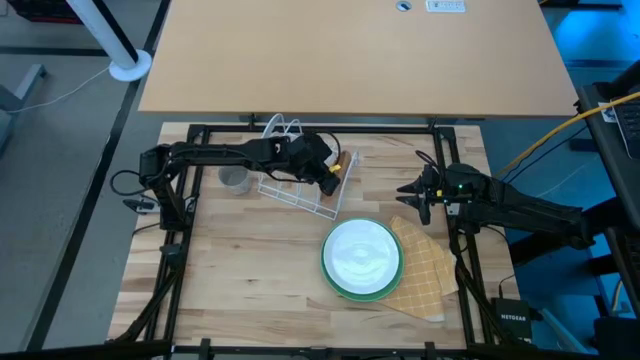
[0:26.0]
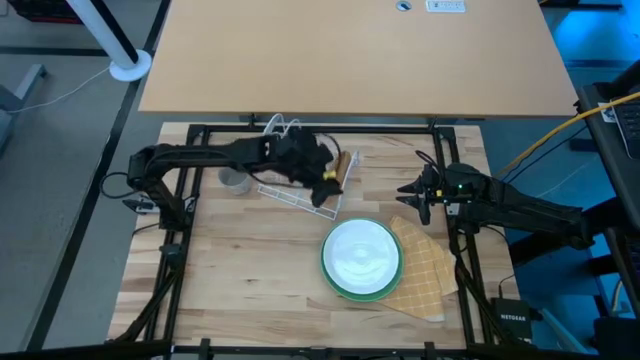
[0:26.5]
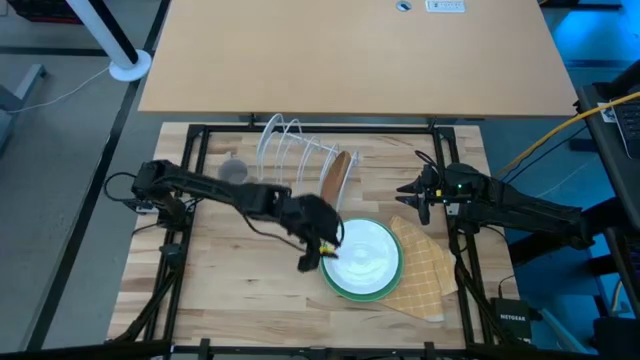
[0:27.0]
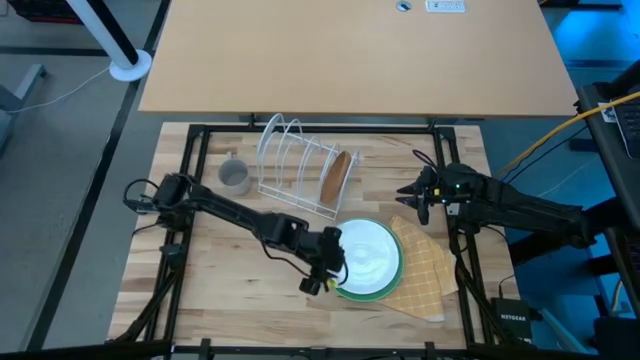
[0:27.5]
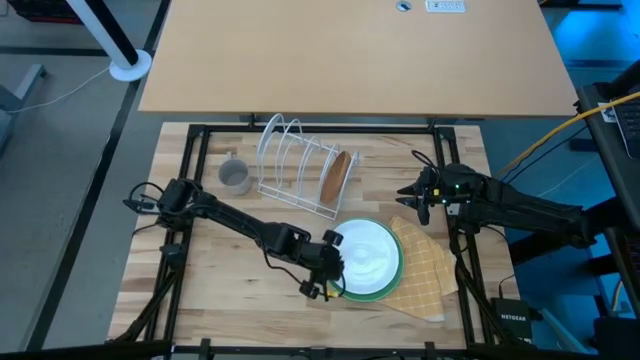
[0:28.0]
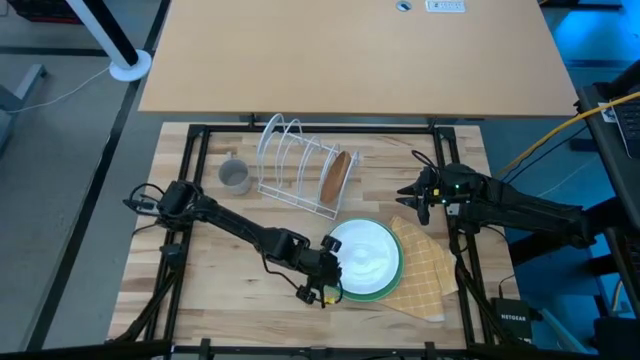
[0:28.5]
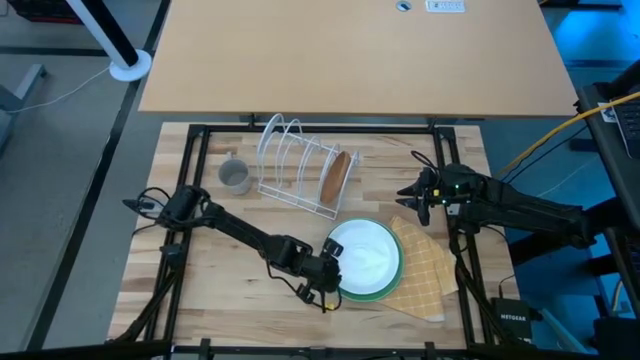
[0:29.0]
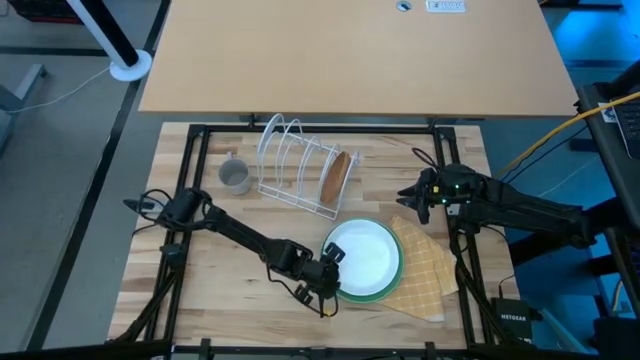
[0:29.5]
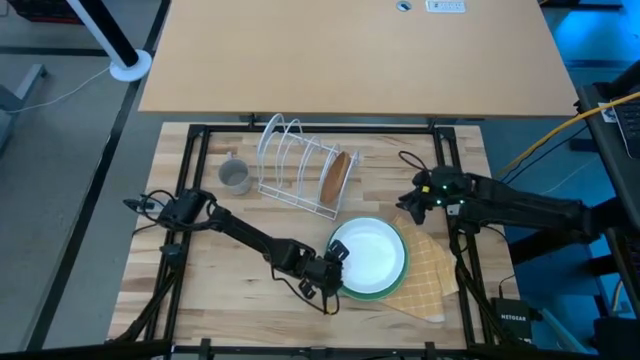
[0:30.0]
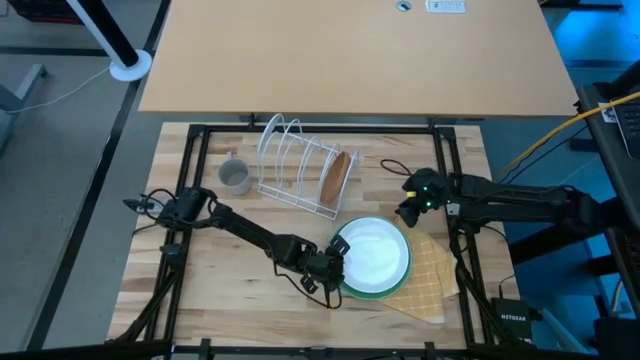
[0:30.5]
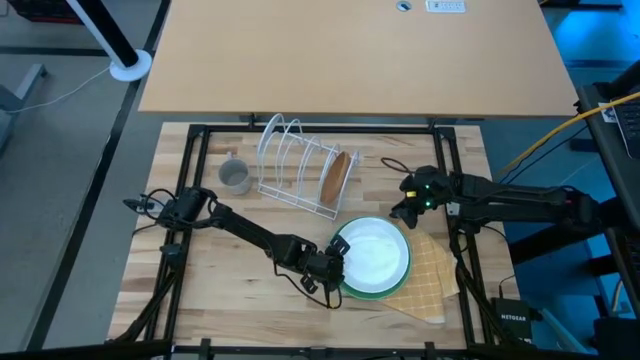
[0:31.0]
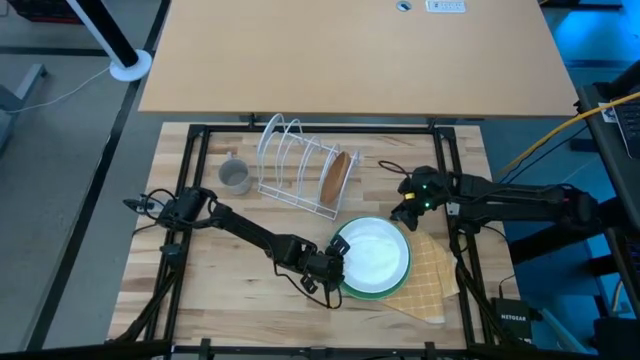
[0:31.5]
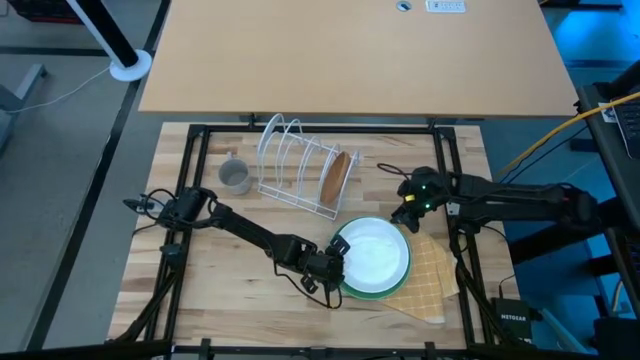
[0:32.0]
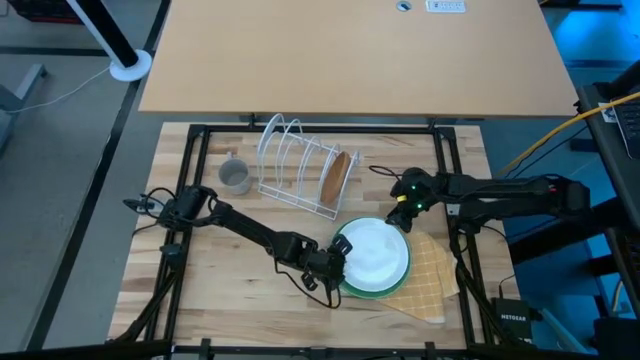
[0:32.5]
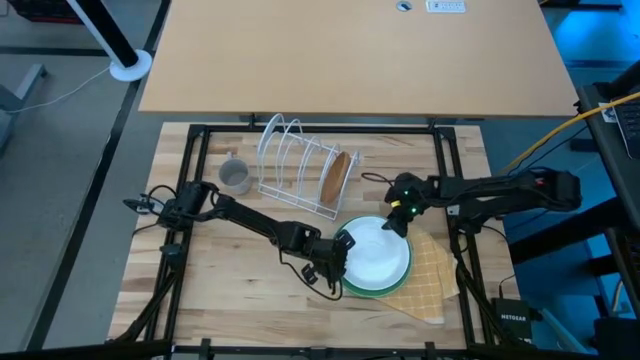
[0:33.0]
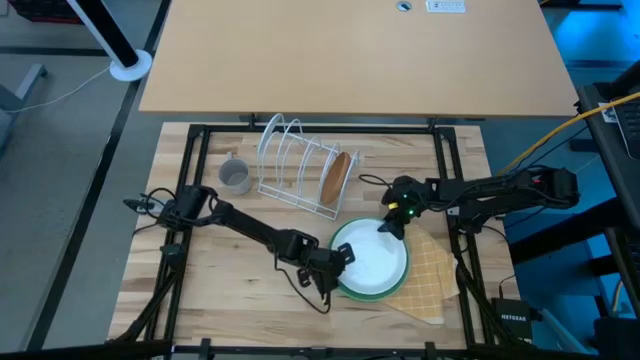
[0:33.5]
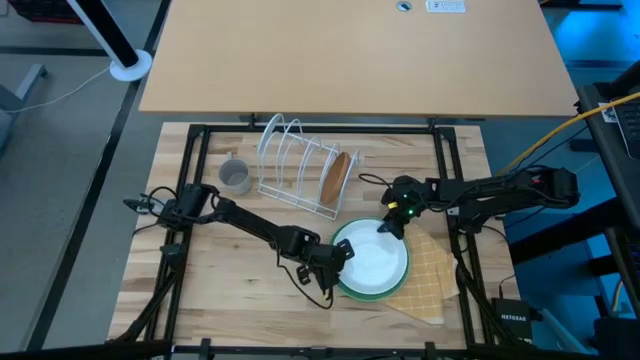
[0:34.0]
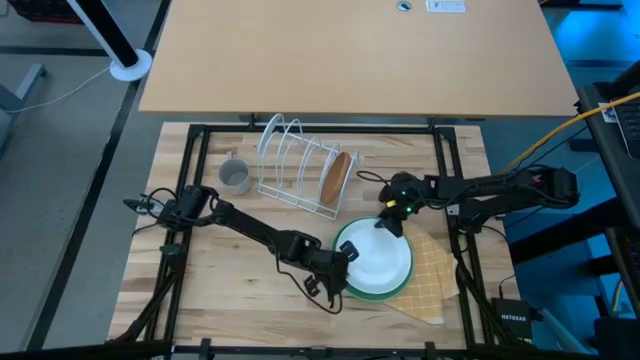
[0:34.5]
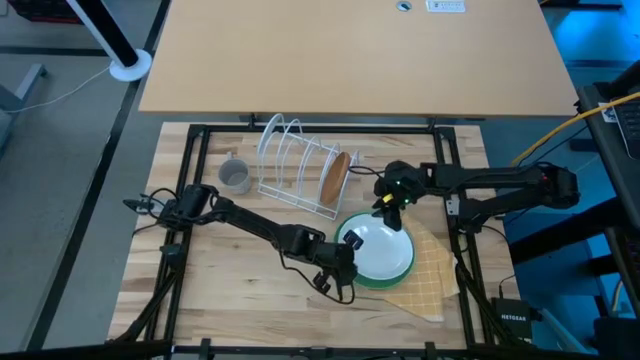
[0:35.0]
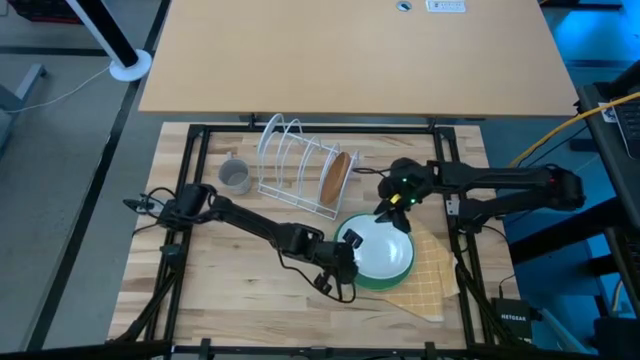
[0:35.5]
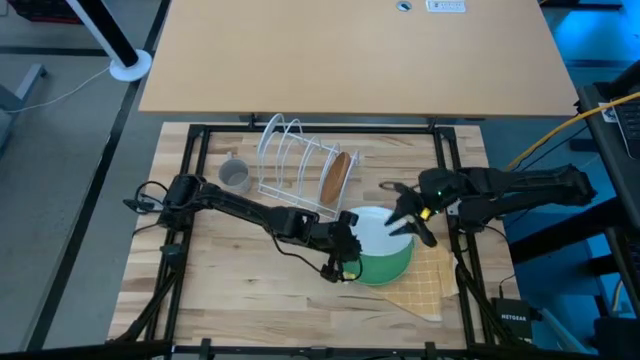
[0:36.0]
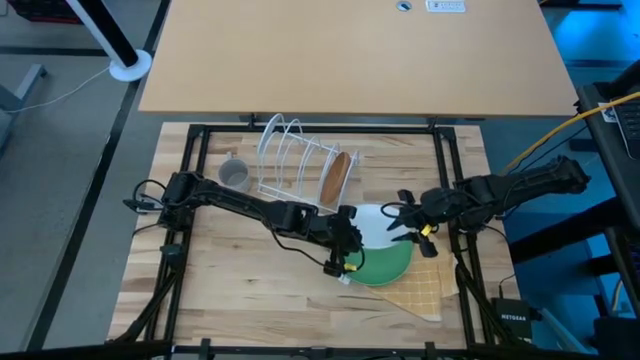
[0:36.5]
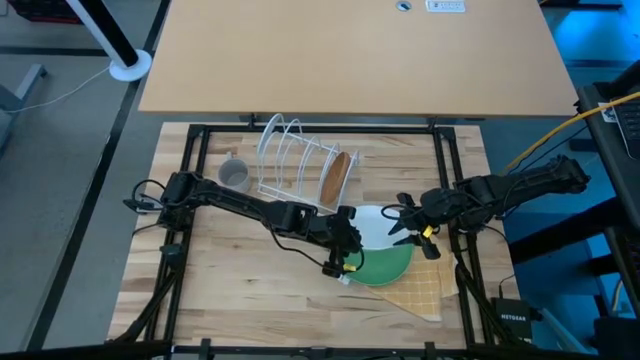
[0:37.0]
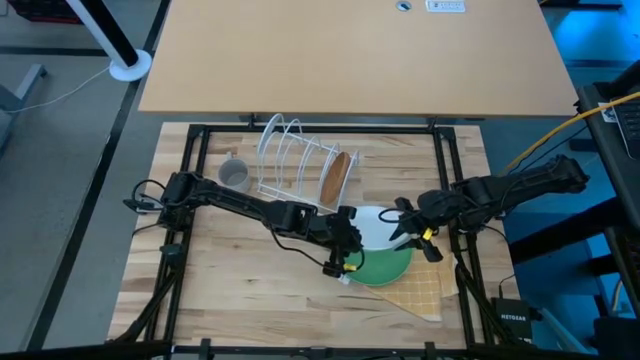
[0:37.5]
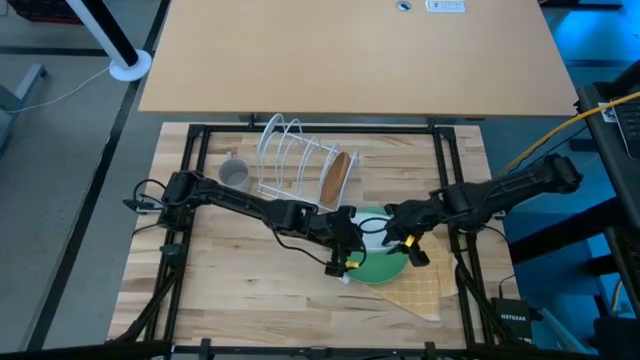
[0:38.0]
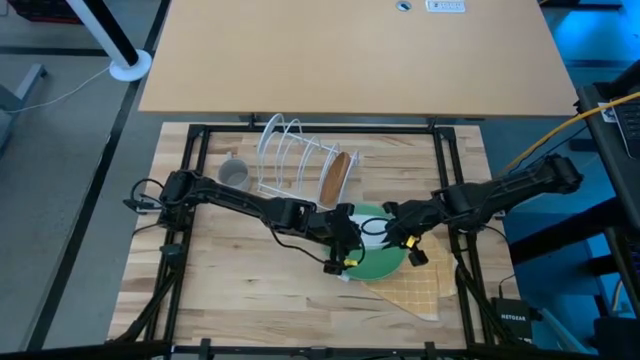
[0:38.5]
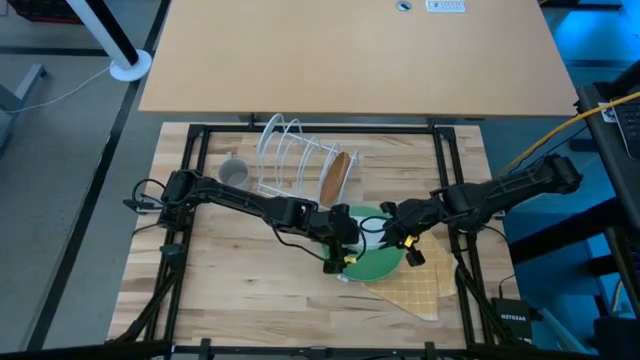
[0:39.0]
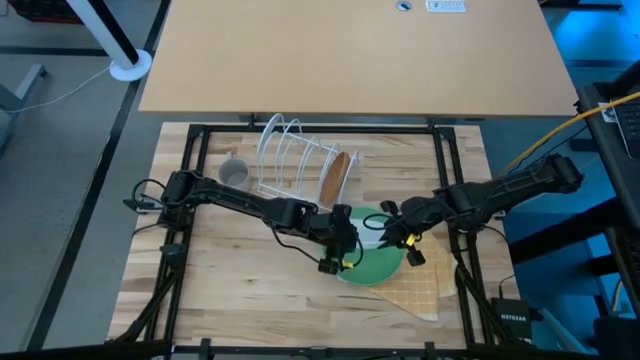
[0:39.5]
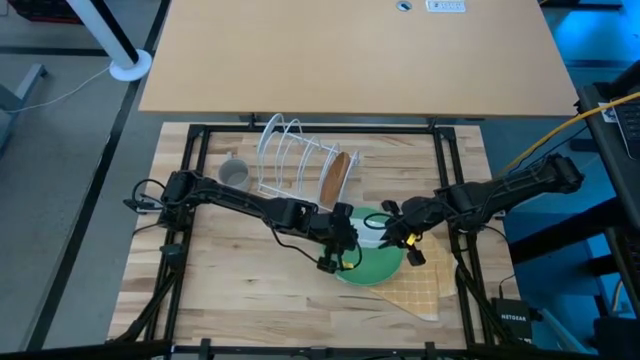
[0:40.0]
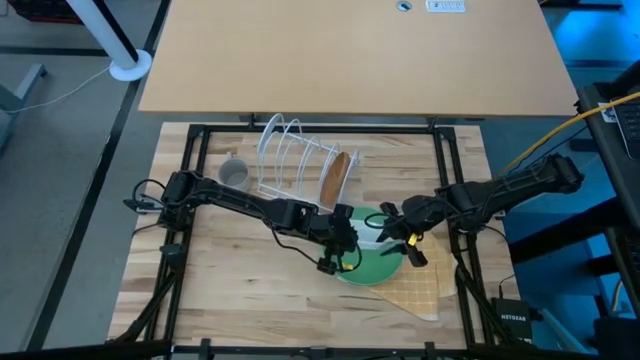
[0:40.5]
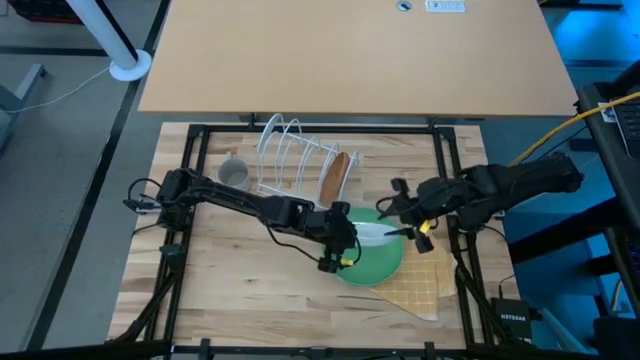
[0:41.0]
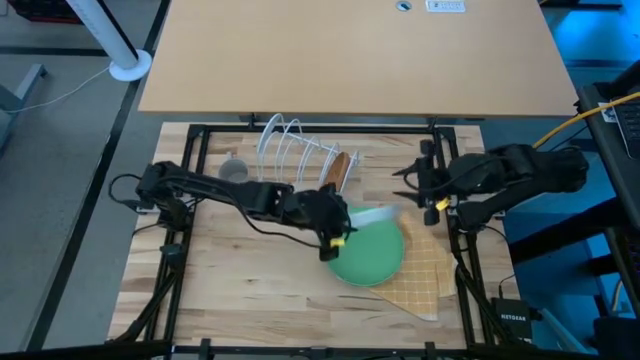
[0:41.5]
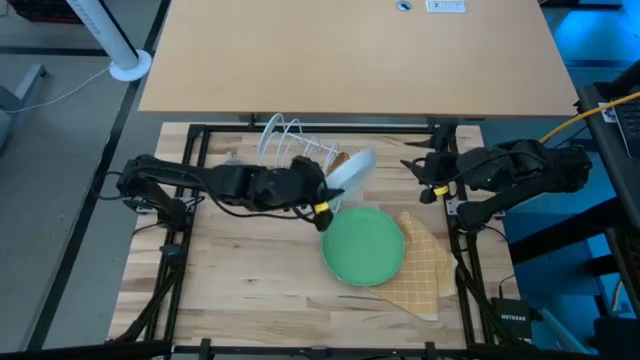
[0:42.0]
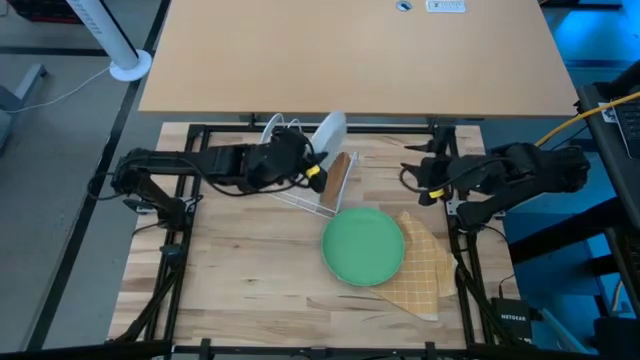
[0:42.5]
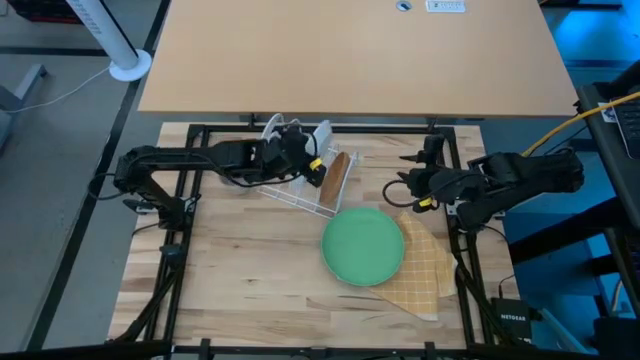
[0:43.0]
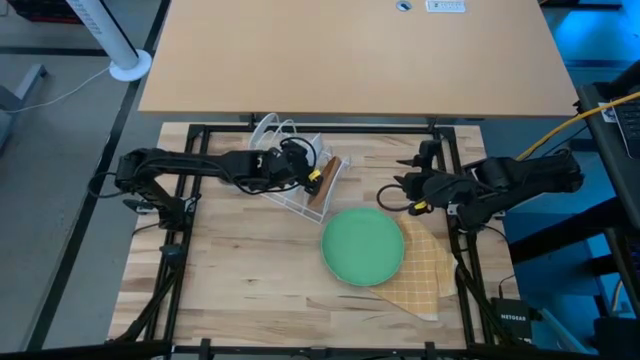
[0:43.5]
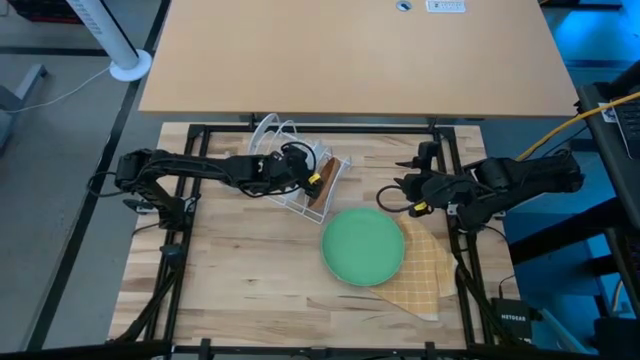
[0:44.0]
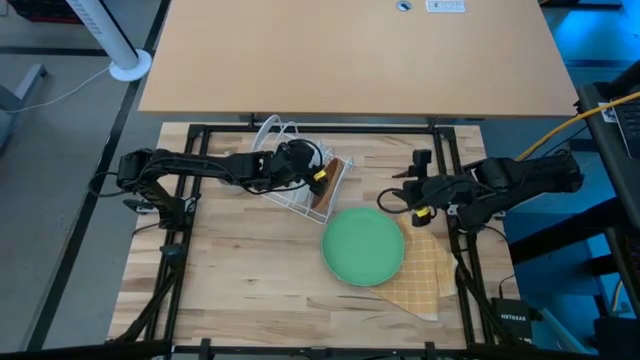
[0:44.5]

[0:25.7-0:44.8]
Task: Sort dishes
Put the white plate from the top of green plate onto the white dish rack

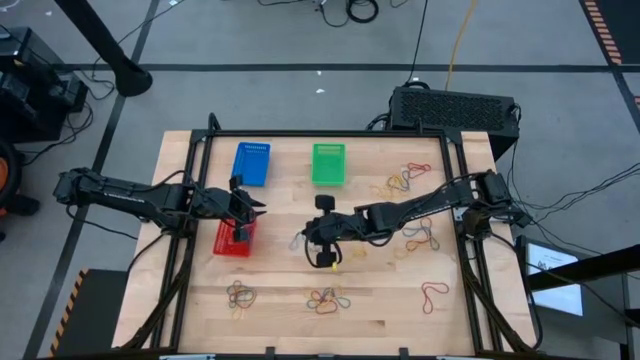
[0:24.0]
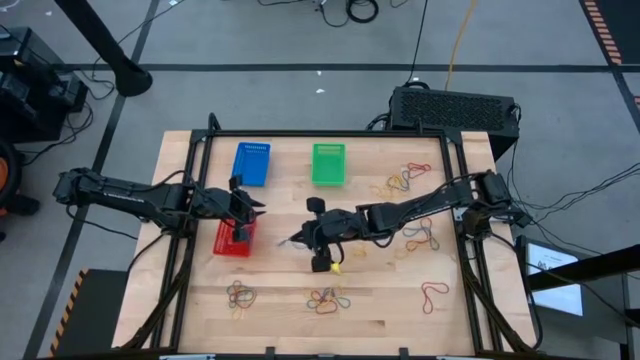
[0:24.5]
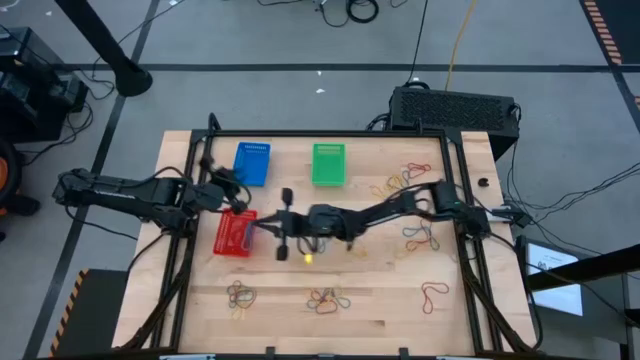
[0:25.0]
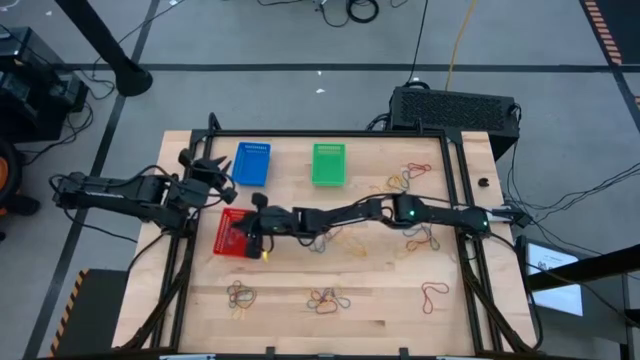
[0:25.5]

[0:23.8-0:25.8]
Task: Sort rubber bands into baskets
Put the blue rubber band into the red basket
